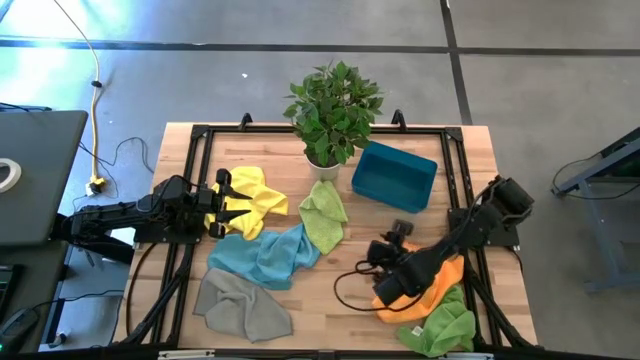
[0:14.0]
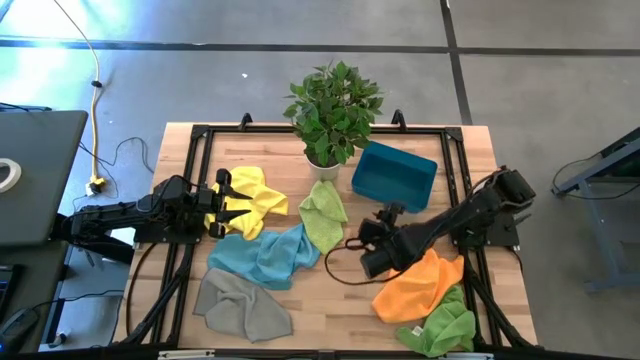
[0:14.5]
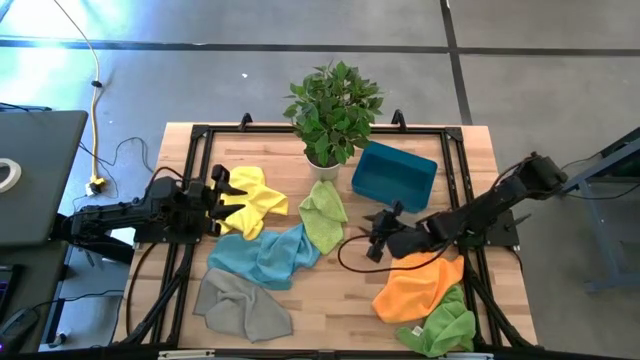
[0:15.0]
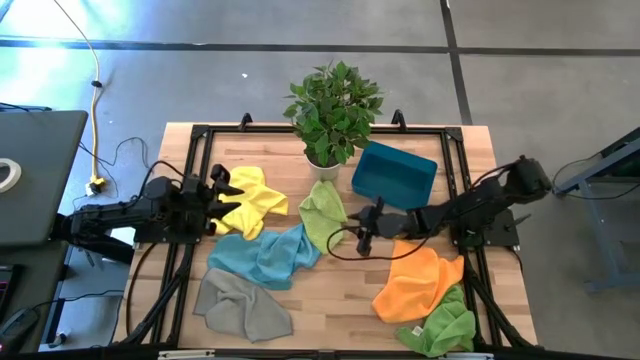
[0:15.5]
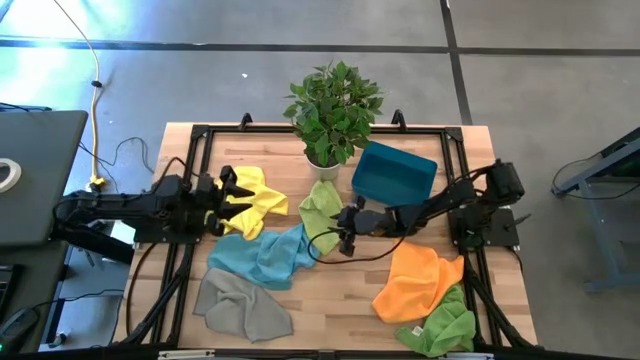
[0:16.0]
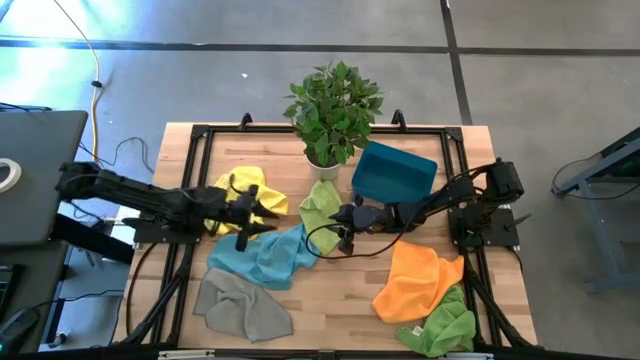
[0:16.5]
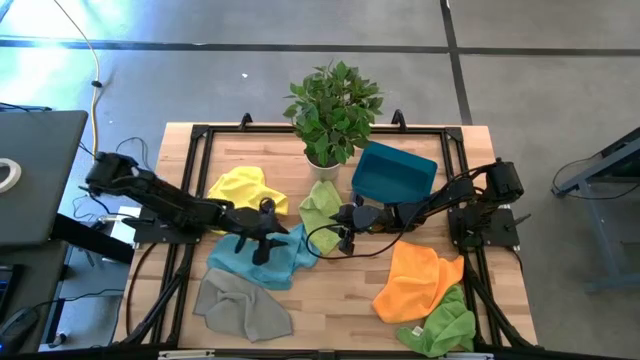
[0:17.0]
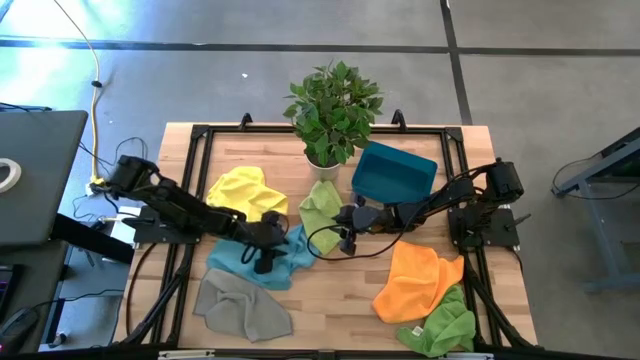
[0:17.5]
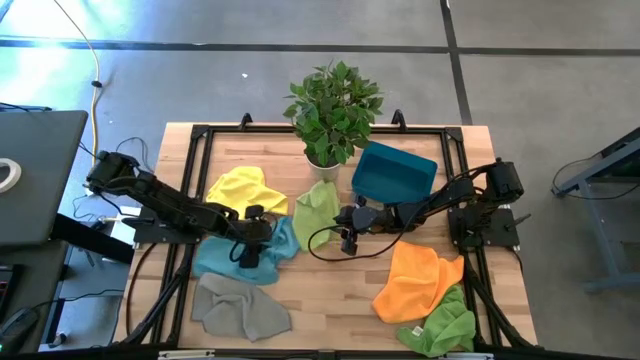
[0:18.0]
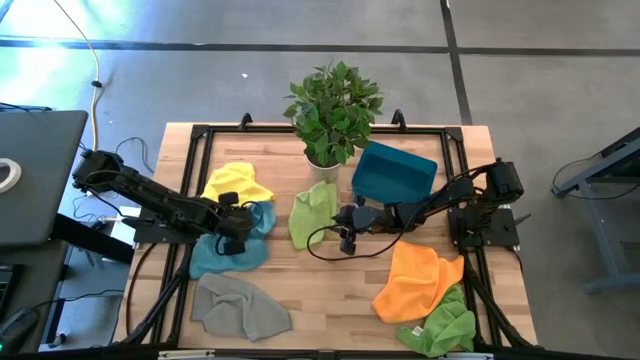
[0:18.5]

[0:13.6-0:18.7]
Task: Fold microfiber towels
Adjust the blue towel

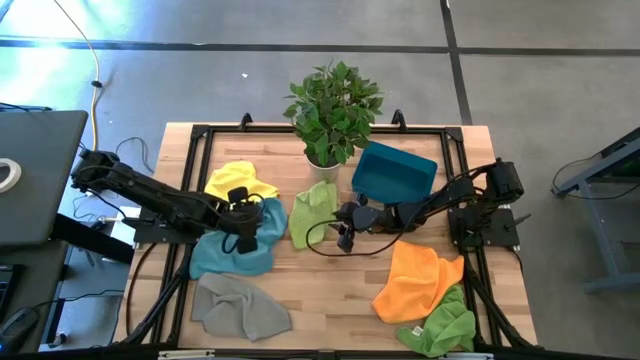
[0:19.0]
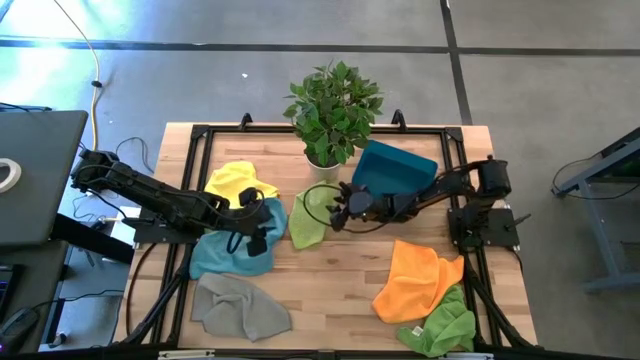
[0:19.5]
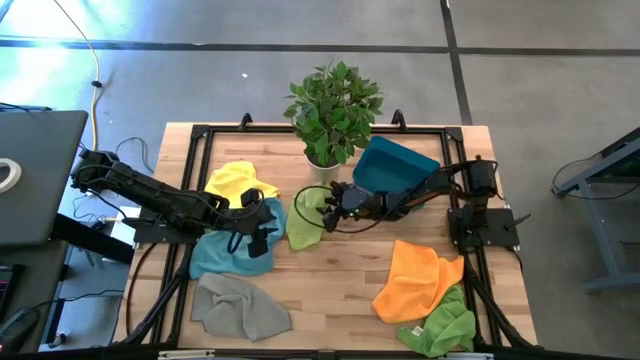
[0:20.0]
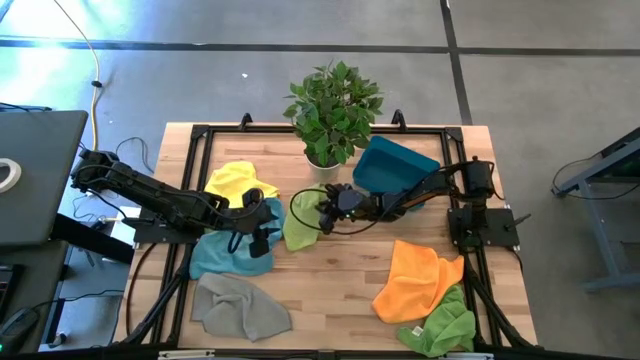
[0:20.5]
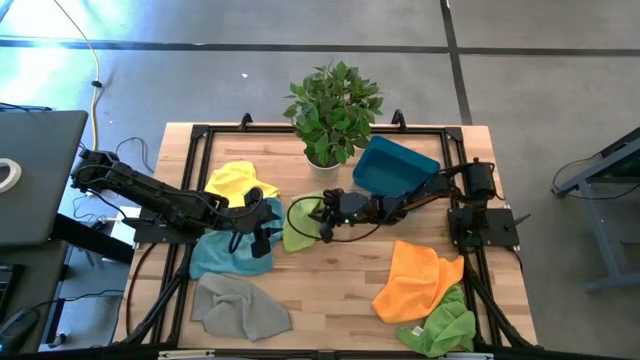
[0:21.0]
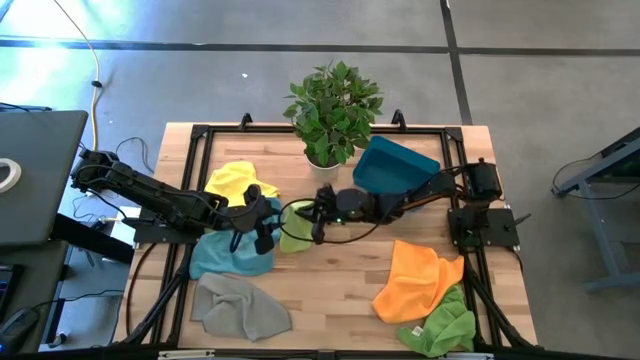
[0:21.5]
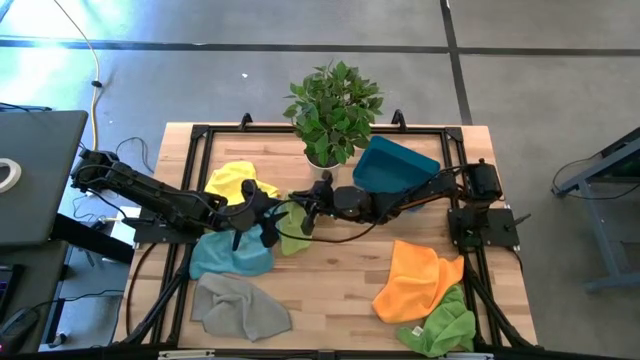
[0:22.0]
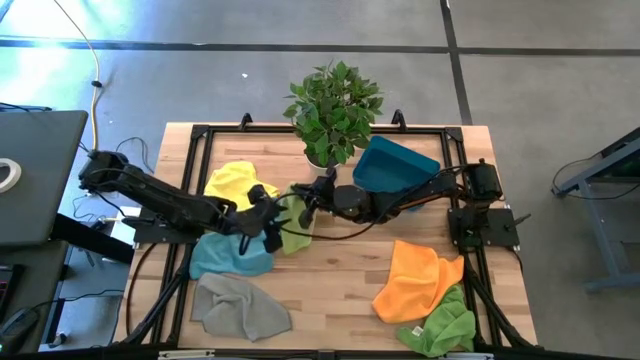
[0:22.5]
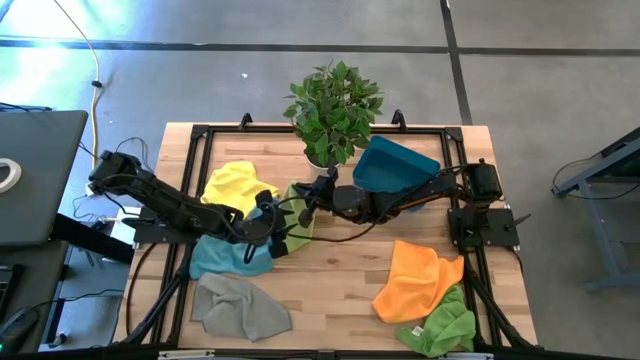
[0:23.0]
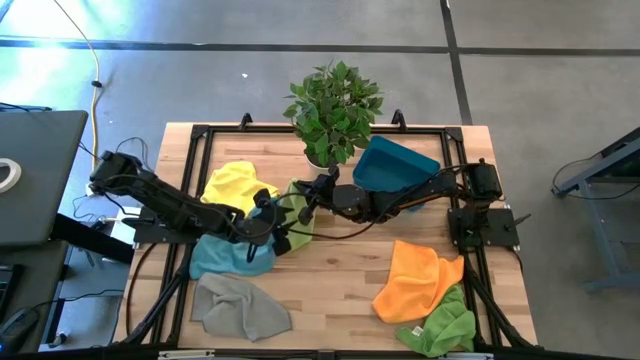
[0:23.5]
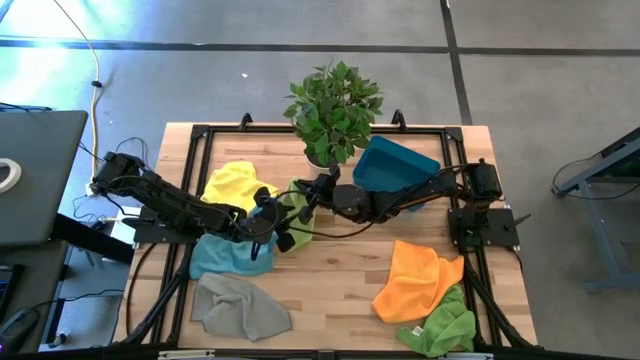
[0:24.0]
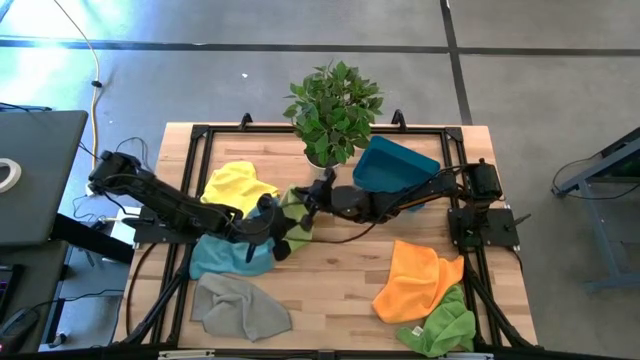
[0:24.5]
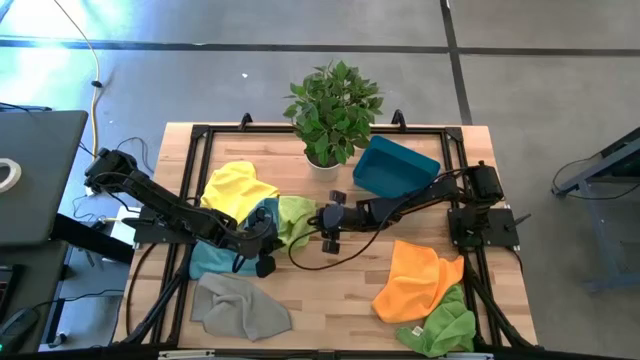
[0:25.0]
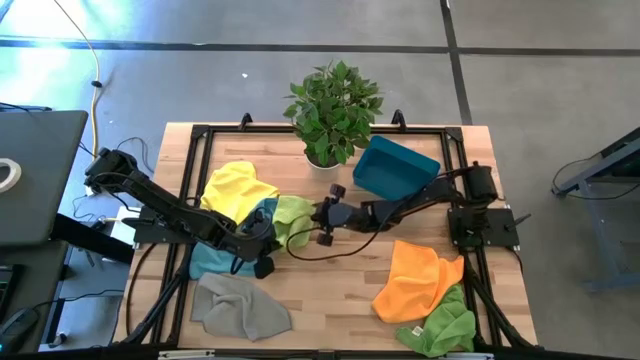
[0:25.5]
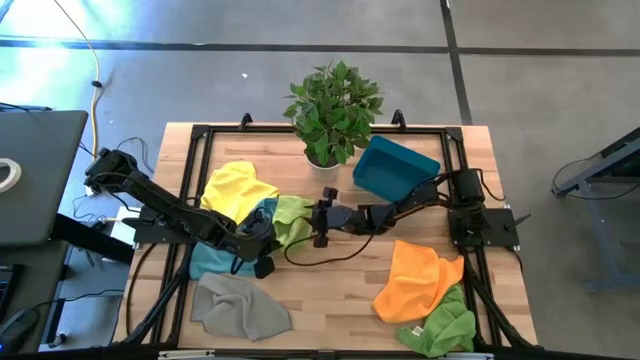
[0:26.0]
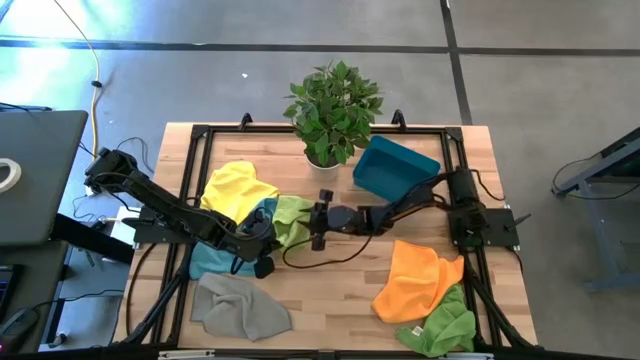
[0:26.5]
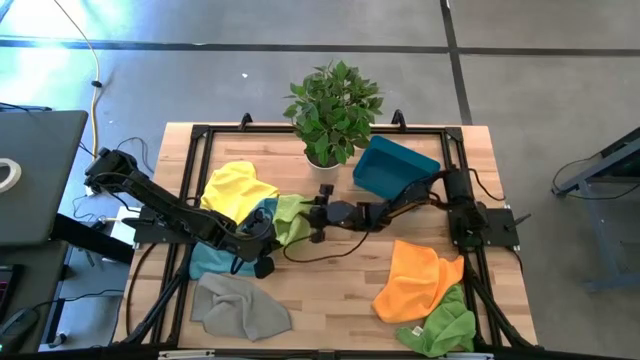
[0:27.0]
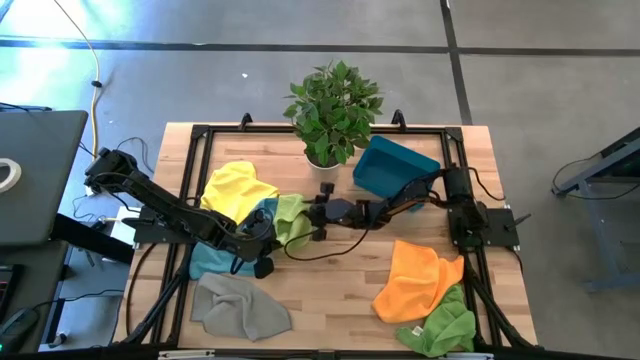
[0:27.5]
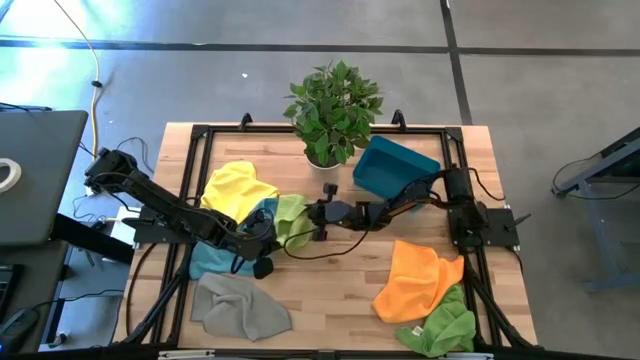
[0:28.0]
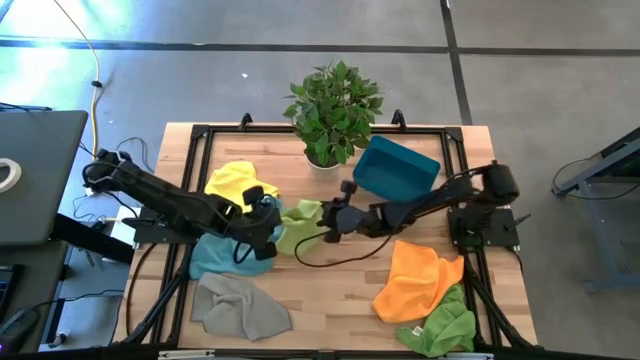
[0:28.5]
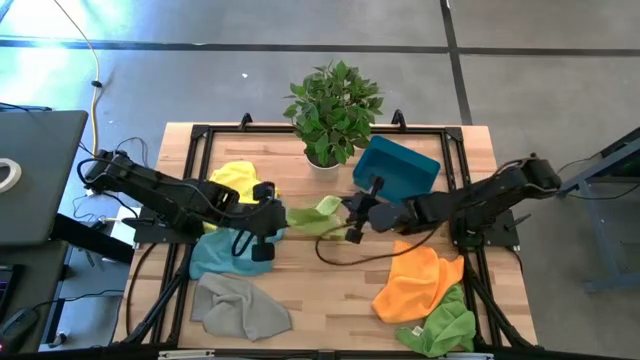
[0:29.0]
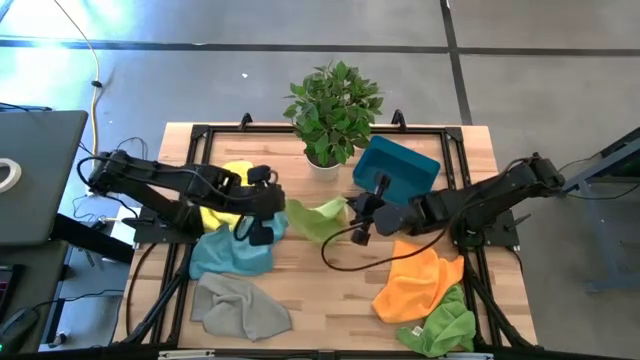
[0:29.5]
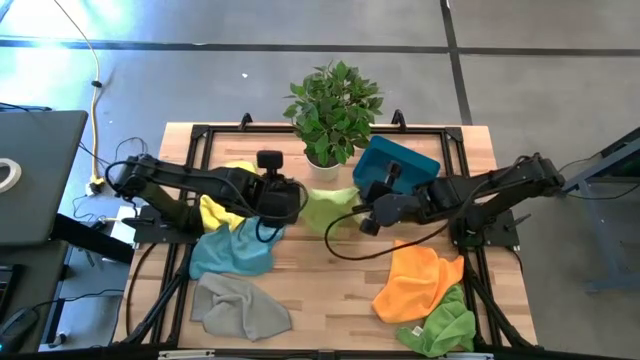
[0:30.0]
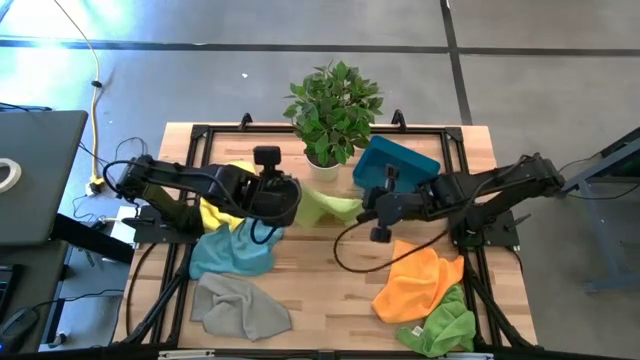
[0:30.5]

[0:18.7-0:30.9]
Fold the light green towel

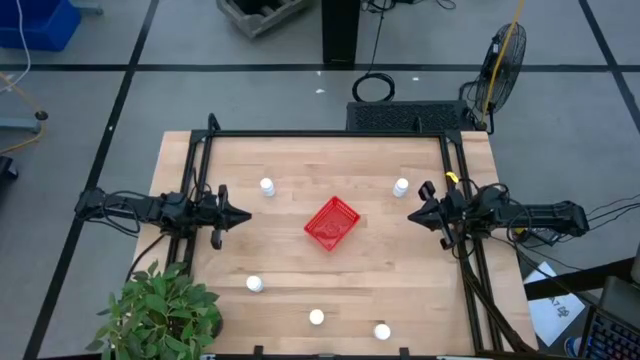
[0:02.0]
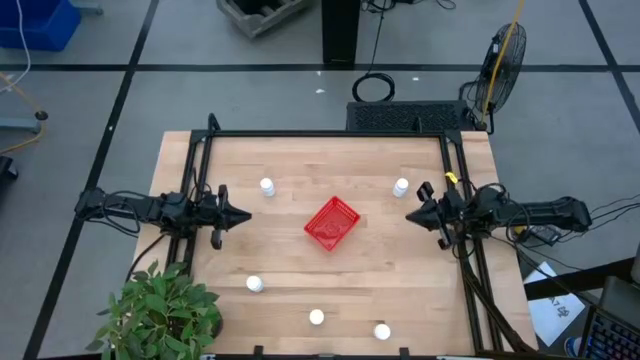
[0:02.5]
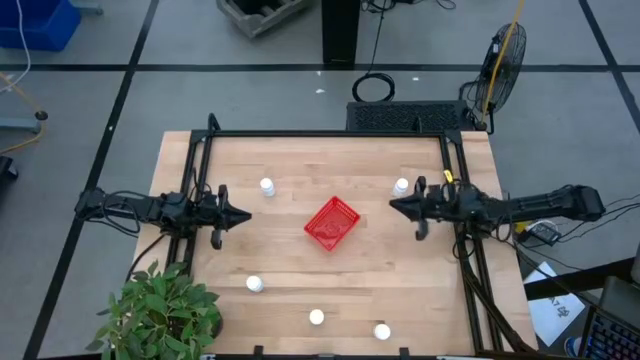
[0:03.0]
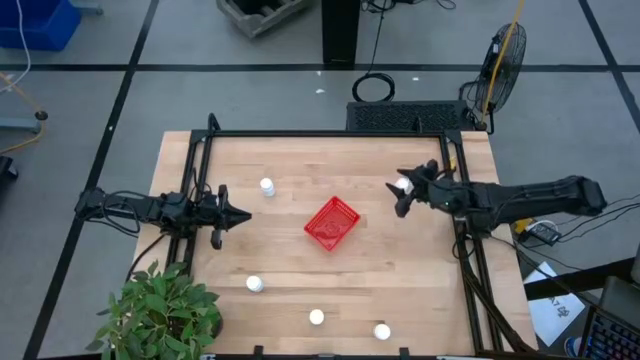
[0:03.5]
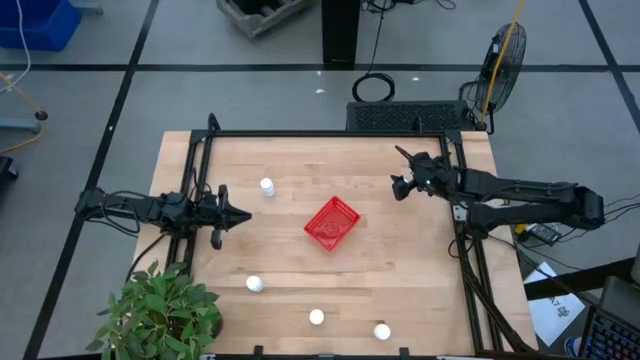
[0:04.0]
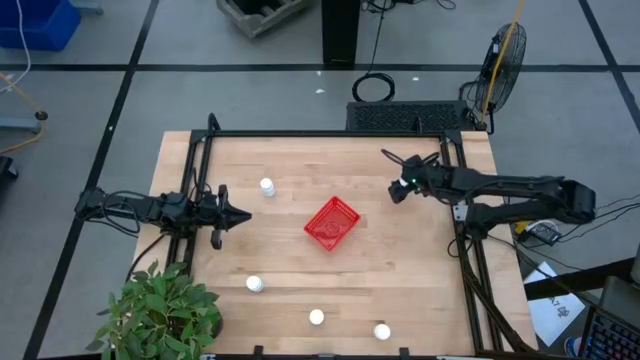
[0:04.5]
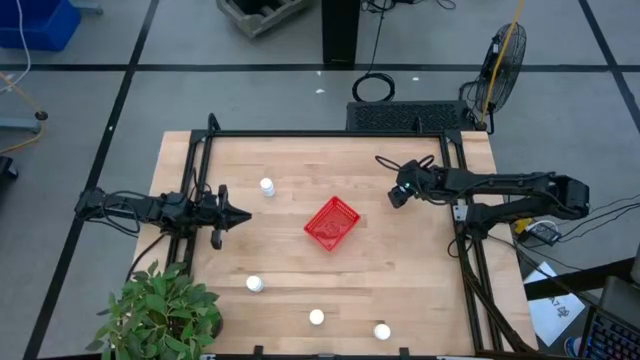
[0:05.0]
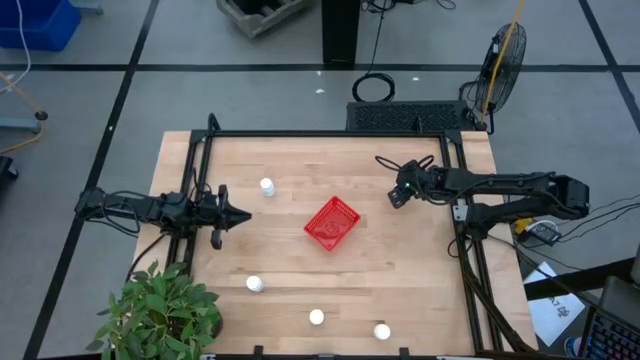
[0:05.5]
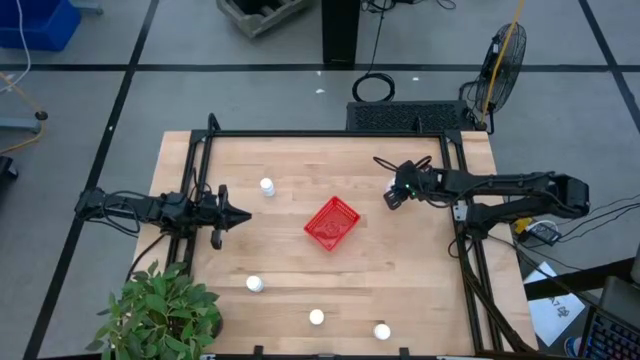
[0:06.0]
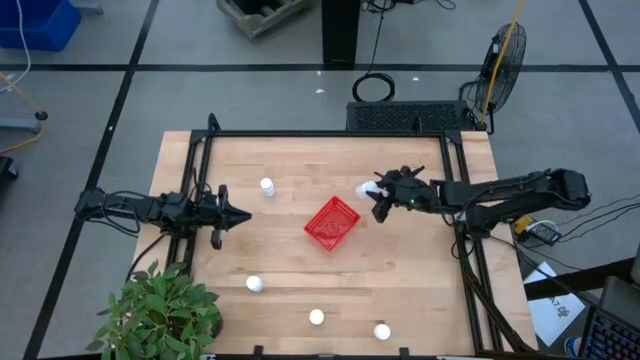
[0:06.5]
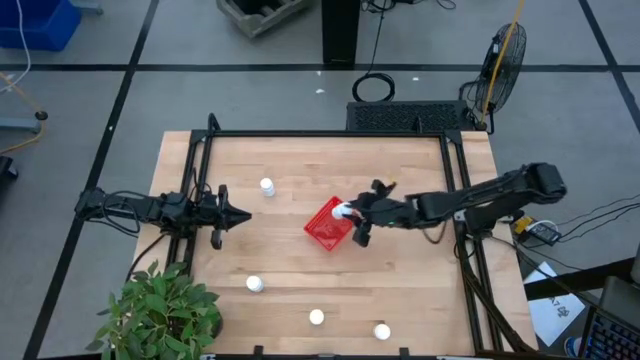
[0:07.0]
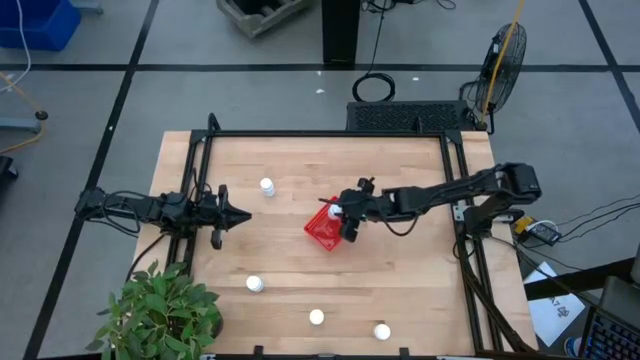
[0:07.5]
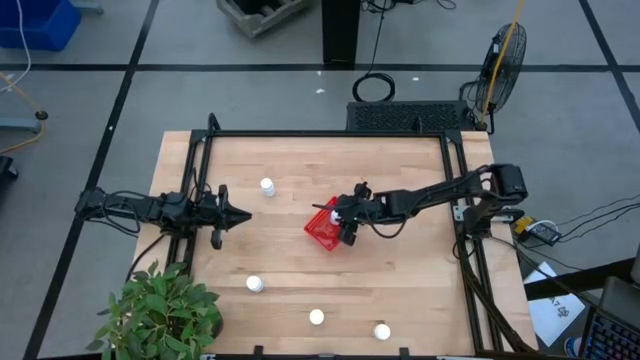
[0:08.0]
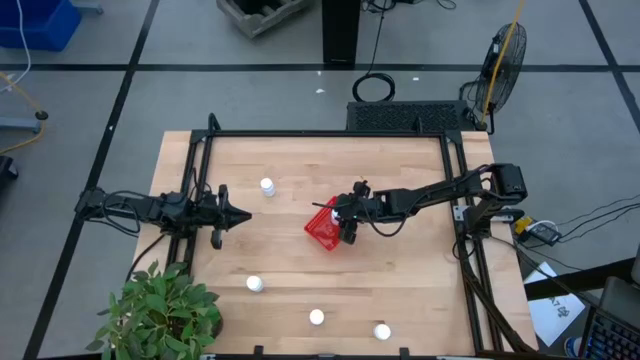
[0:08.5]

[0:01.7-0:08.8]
Task: Pick and place pill bottles into a basket
Put the white medicine bottle into the red bin
